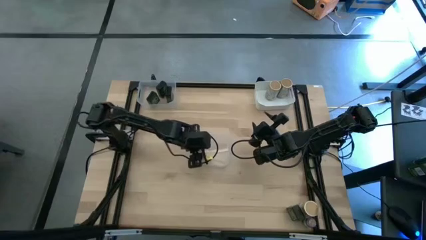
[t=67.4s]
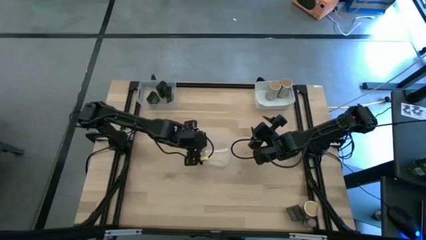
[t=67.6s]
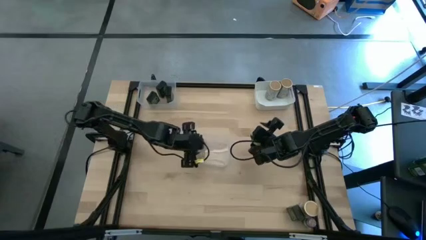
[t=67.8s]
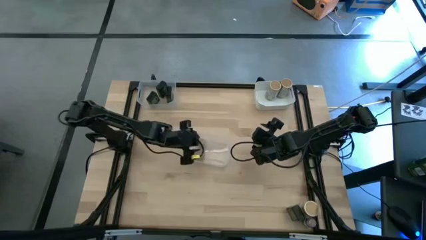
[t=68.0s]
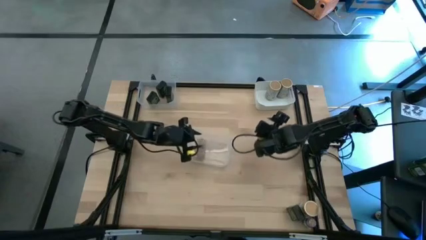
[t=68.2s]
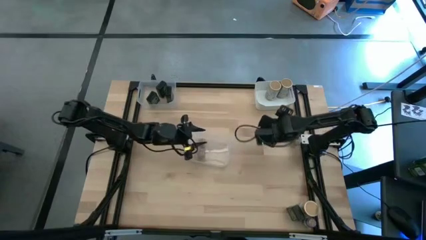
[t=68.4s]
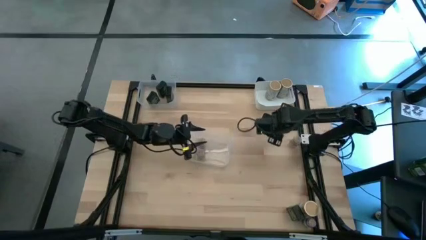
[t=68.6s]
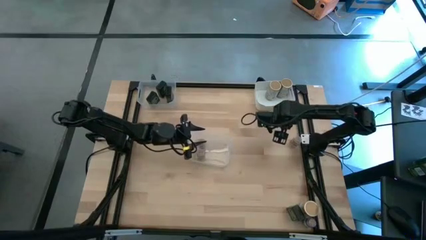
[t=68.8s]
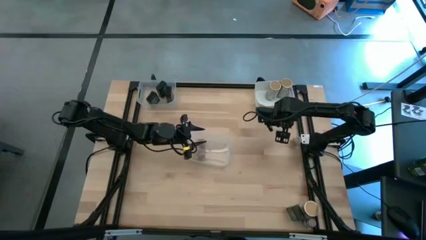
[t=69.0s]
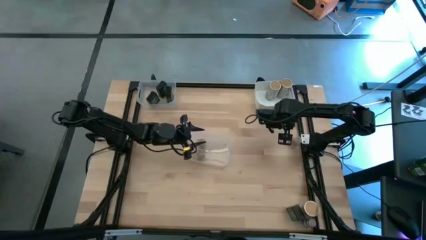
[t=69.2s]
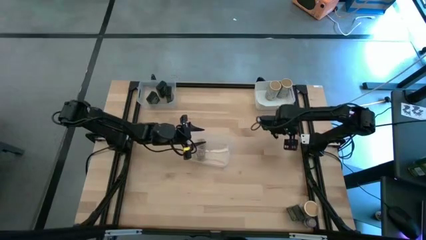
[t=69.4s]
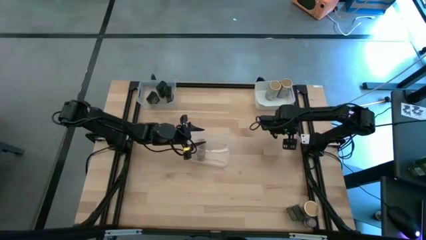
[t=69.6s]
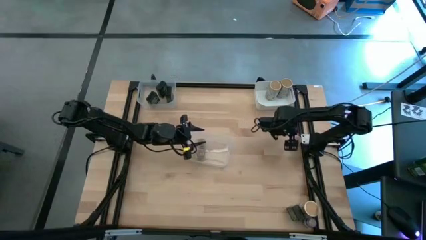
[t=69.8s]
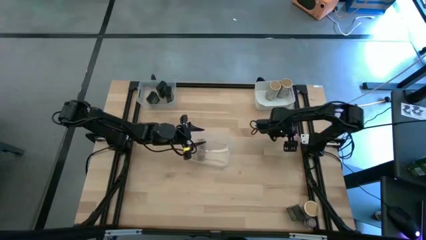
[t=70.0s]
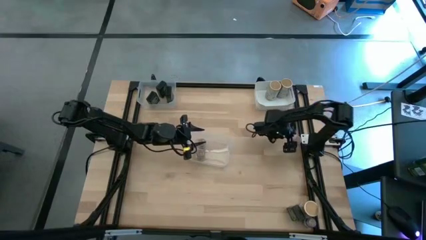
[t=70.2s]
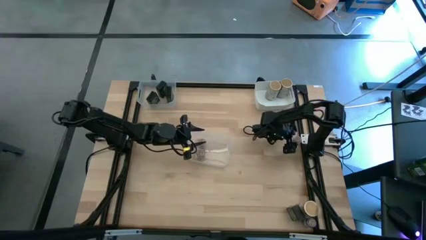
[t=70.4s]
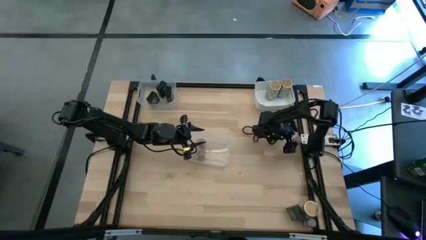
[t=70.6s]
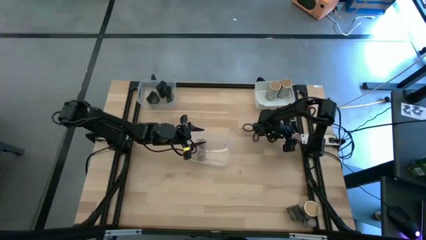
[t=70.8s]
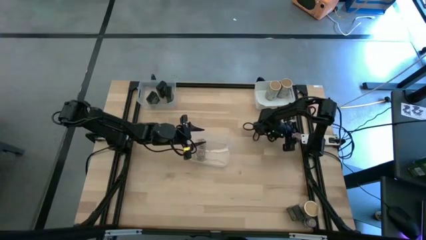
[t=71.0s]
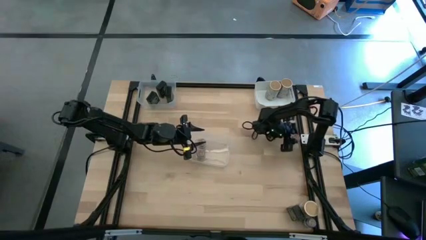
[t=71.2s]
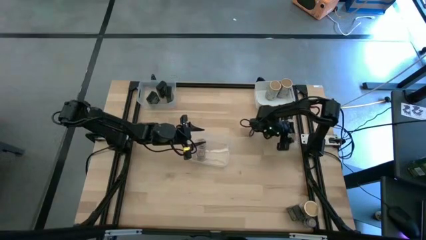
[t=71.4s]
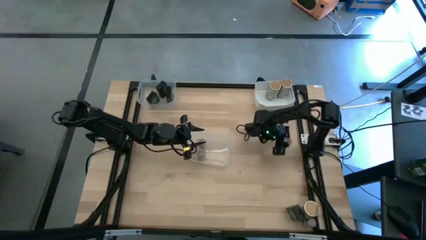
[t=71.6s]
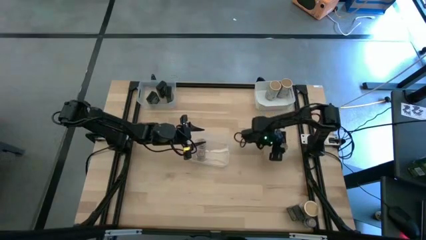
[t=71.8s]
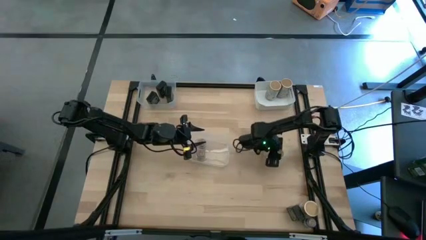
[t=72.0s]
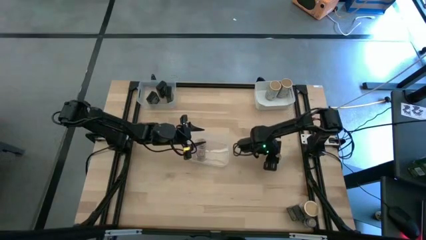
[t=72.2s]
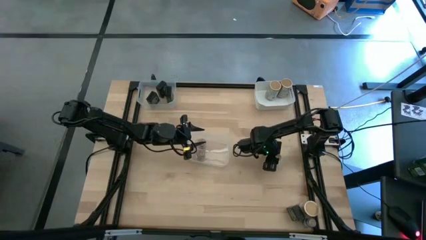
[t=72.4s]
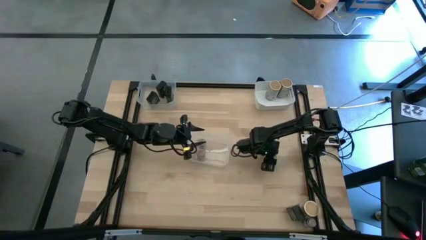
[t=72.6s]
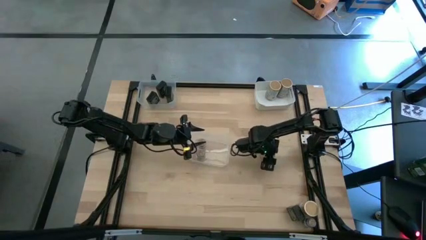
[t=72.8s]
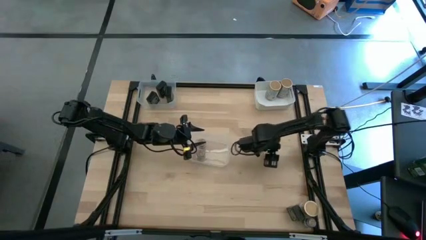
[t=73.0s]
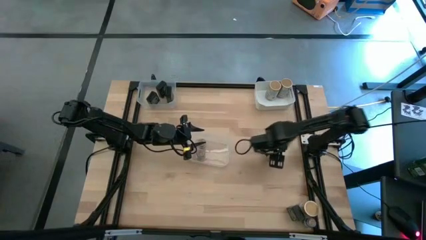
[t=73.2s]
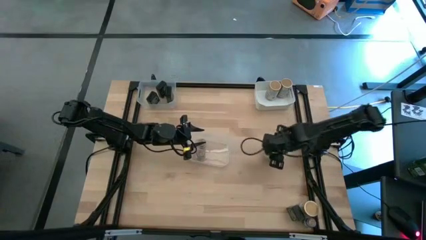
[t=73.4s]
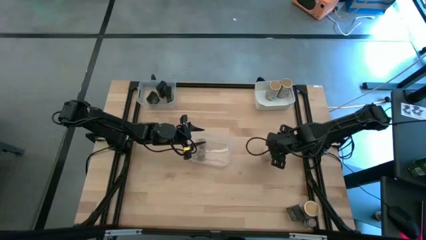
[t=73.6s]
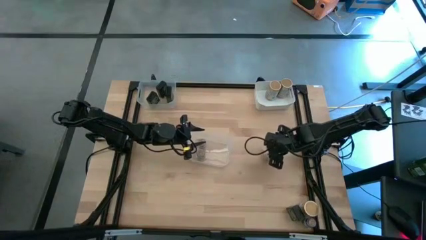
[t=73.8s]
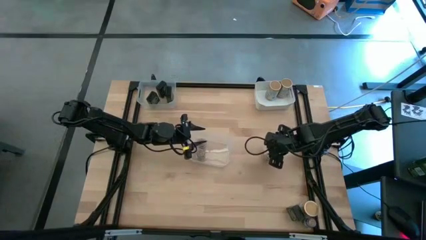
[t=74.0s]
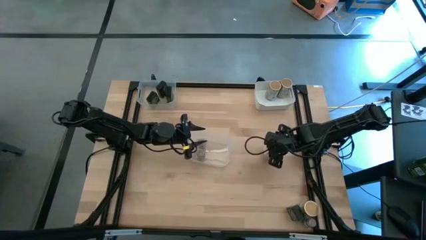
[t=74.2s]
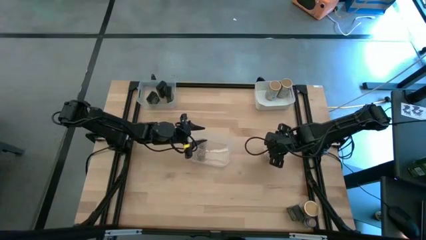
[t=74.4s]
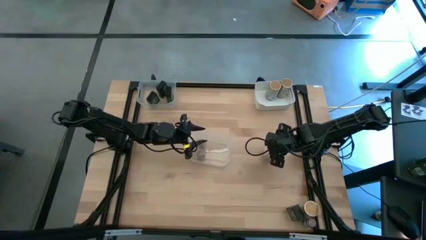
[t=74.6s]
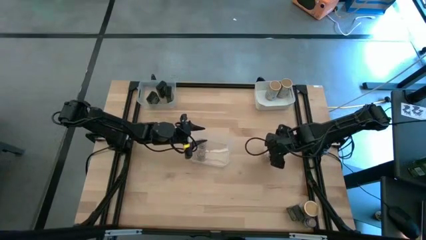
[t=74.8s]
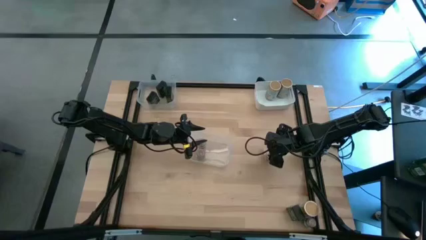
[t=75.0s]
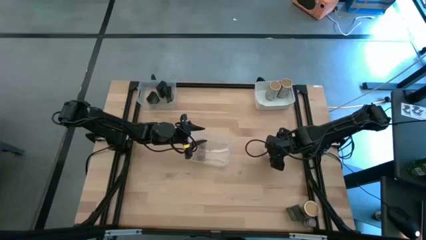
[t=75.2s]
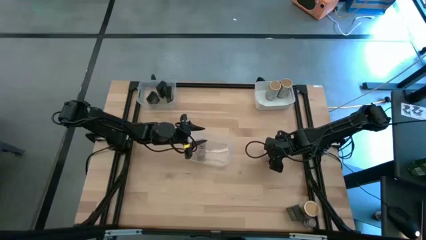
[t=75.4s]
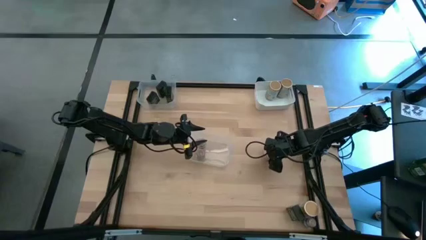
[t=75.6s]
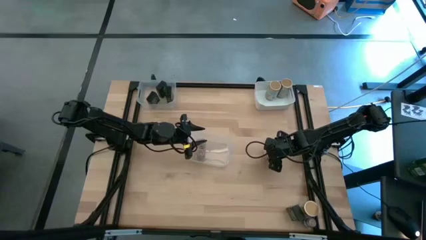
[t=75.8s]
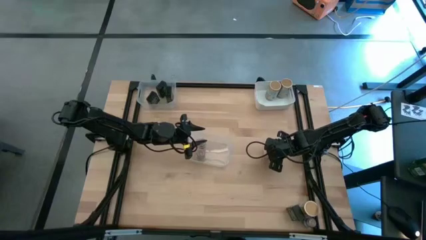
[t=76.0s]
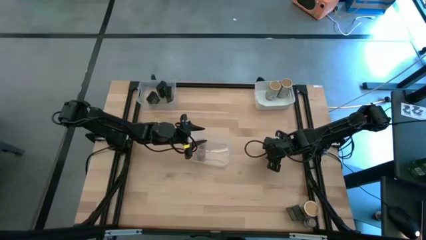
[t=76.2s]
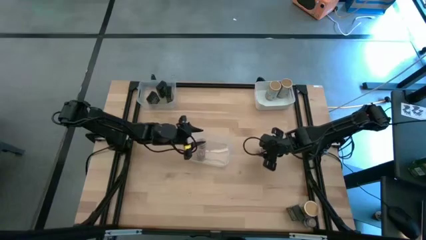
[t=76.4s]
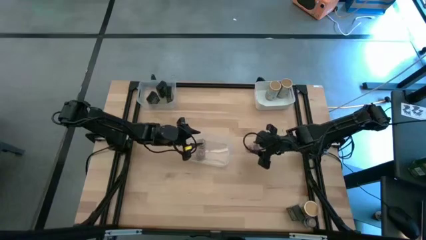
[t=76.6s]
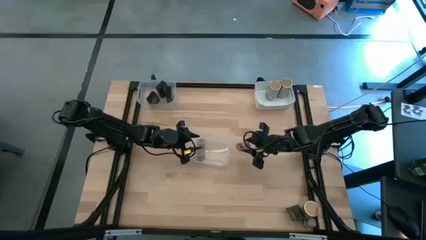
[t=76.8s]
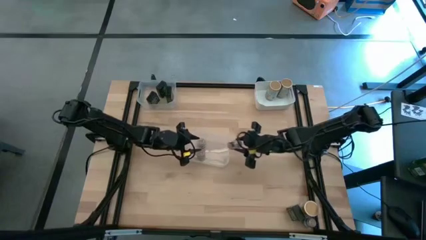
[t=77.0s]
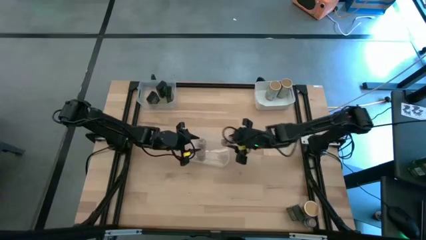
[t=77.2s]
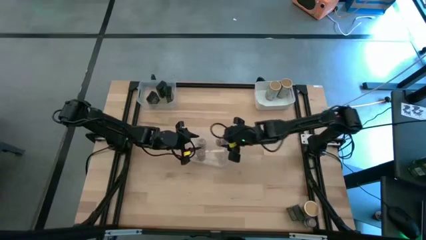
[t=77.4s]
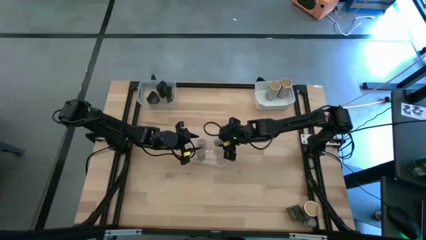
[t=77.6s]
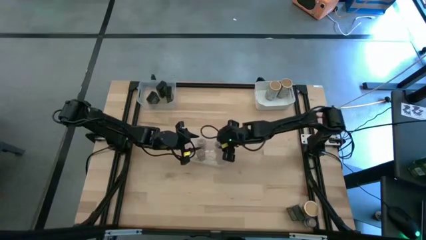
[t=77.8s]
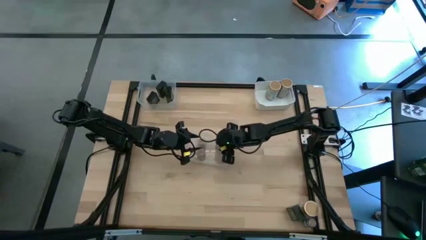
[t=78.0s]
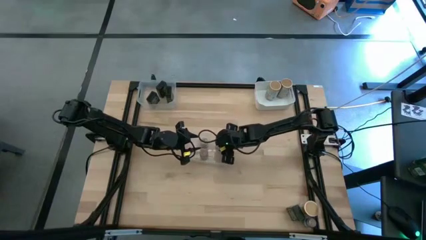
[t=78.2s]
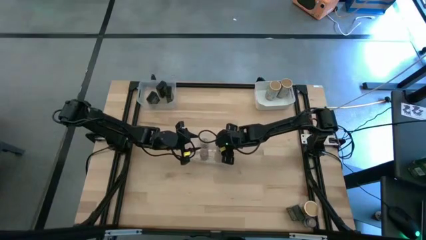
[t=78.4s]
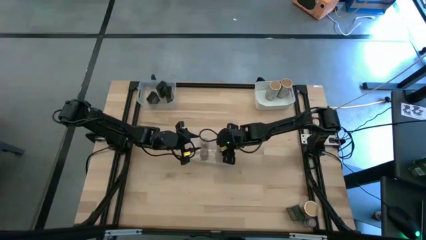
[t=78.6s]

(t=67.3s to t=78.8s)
Task: Sort spices by type
Put the brown seasoning bottle into the bottom transparent bin

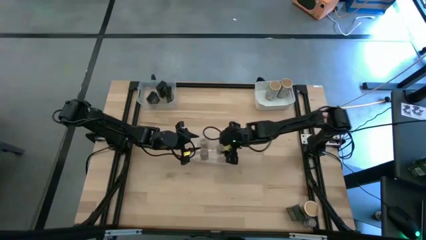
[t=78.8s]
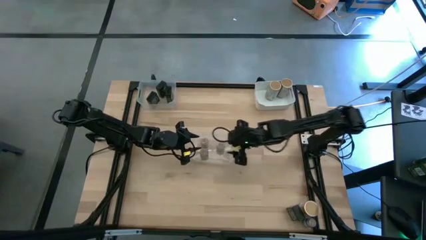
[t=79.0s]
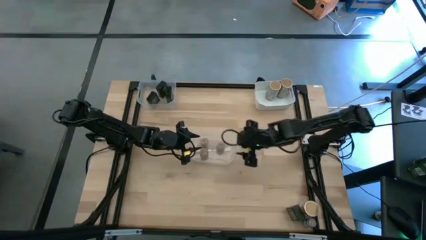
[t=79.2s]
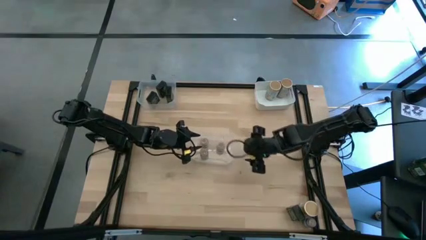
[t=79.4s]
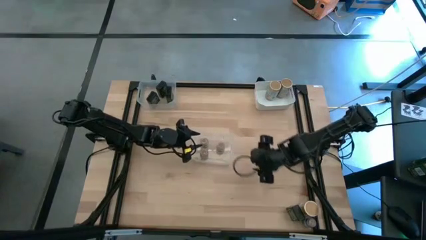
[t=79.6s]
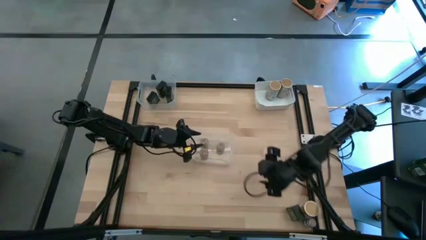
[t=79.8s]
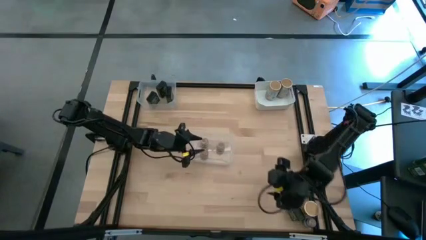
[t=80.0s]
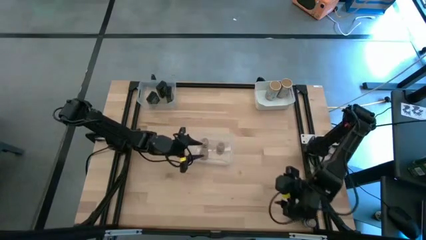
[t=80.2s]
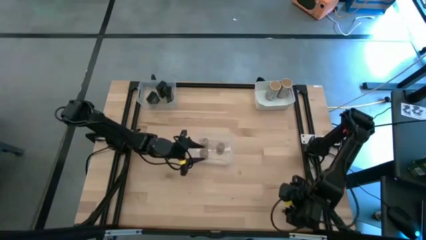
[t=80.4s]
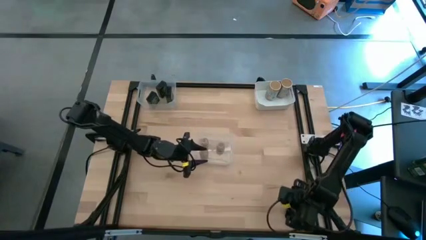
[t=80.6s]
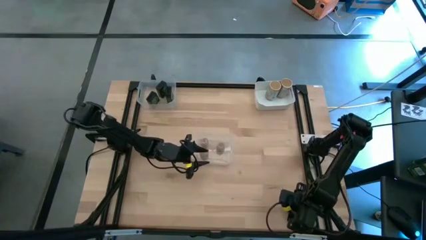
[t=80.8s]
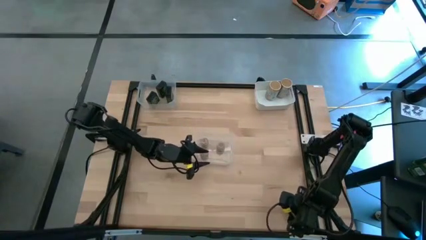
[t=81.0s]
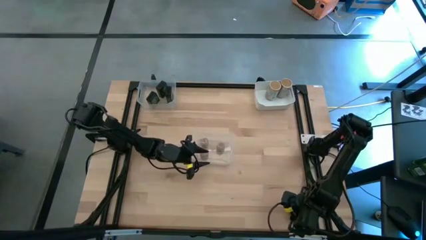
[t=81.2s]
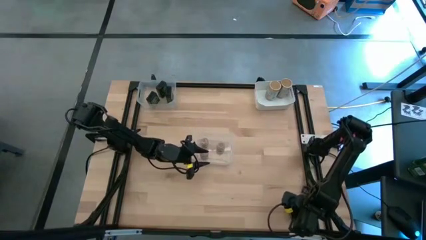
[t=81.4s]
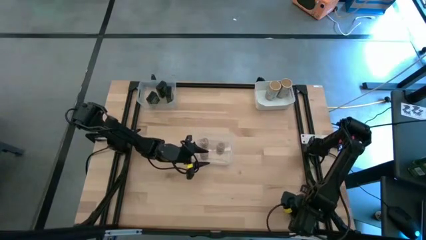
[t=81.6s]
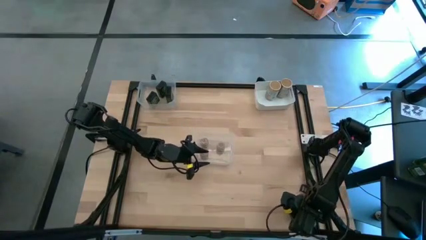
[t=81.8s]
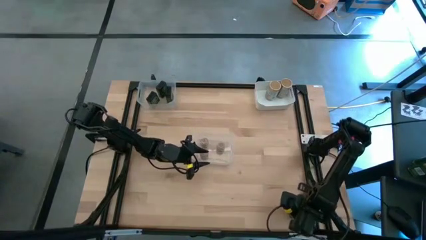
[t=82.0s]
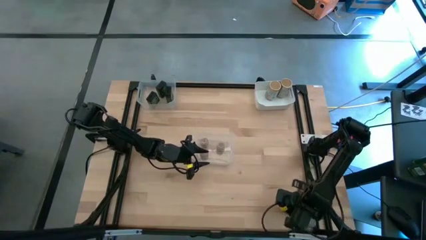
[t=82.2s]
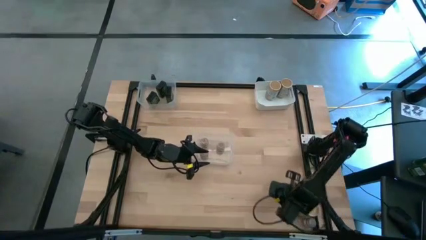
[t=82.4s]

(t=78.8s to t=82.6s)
Put the black seasoning can into the top transparent bin
